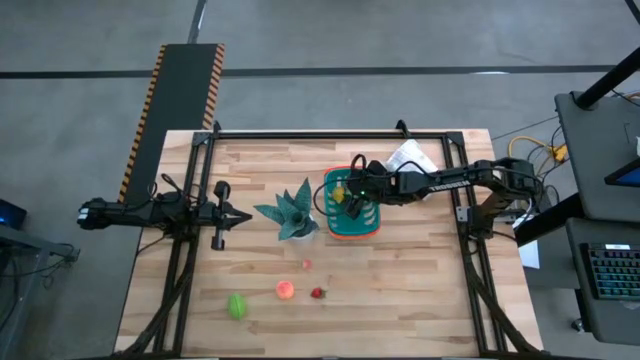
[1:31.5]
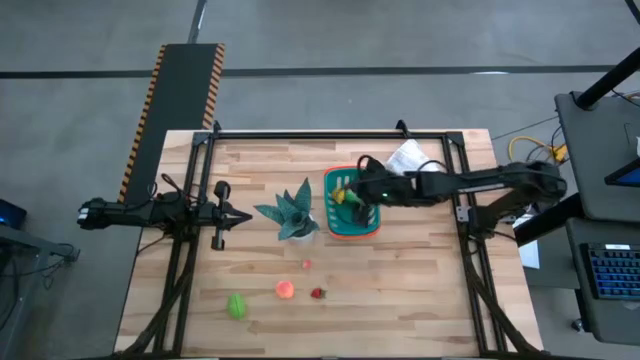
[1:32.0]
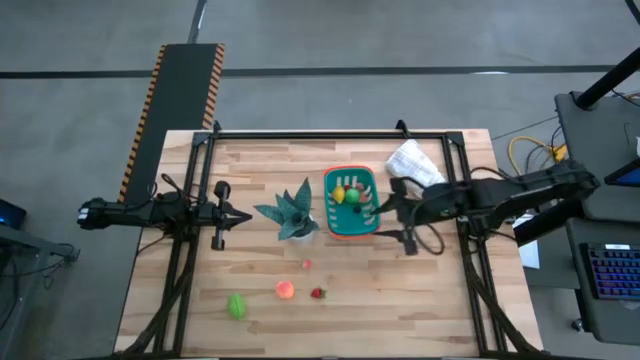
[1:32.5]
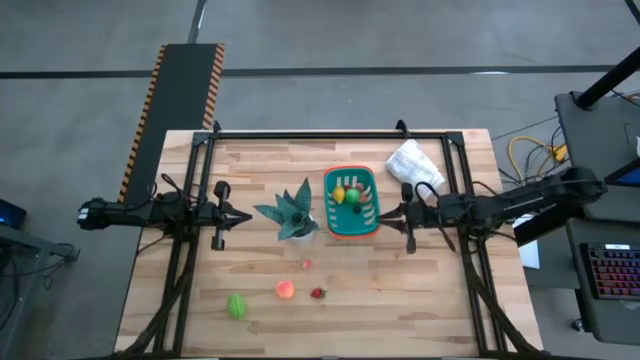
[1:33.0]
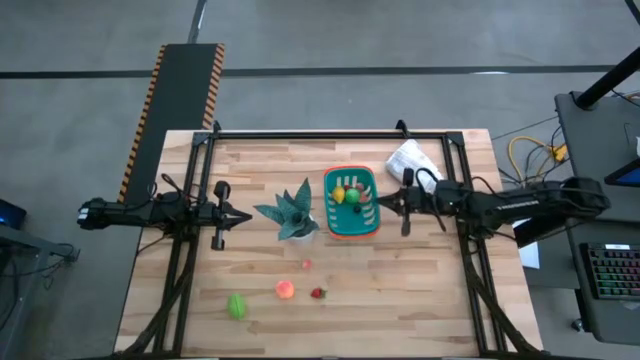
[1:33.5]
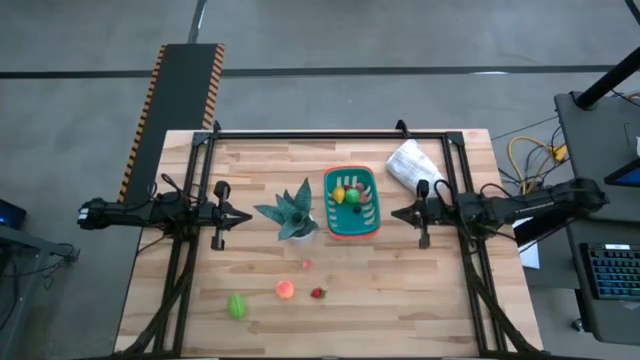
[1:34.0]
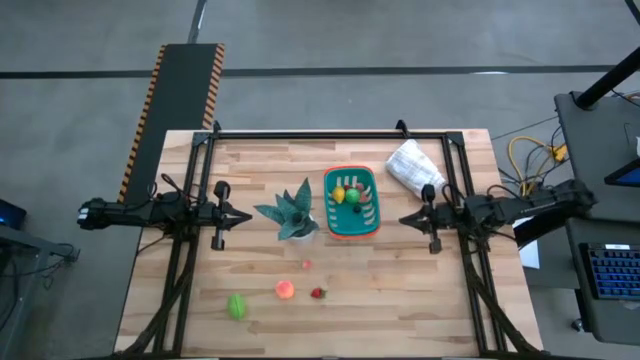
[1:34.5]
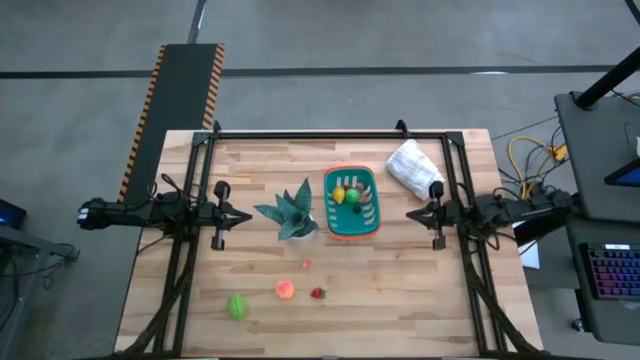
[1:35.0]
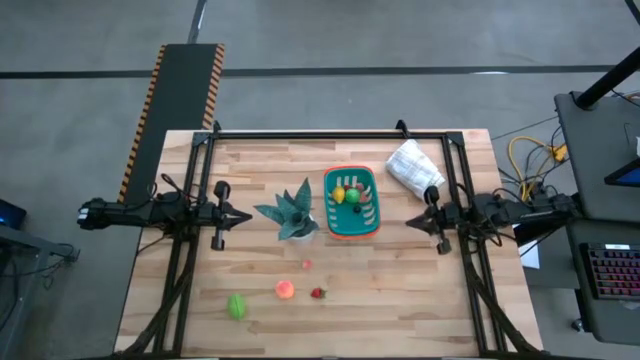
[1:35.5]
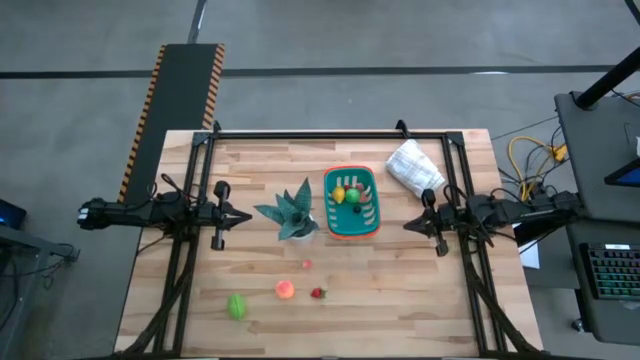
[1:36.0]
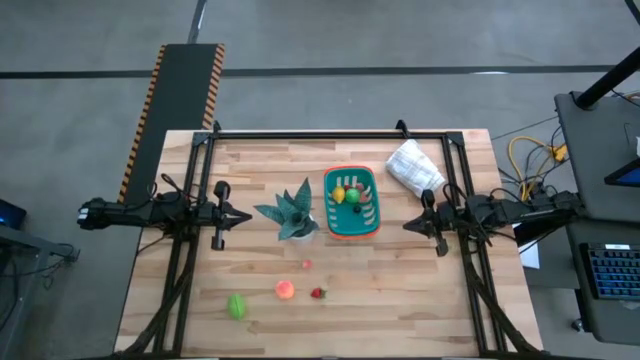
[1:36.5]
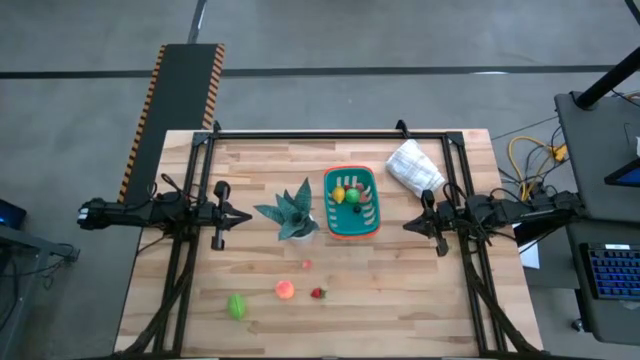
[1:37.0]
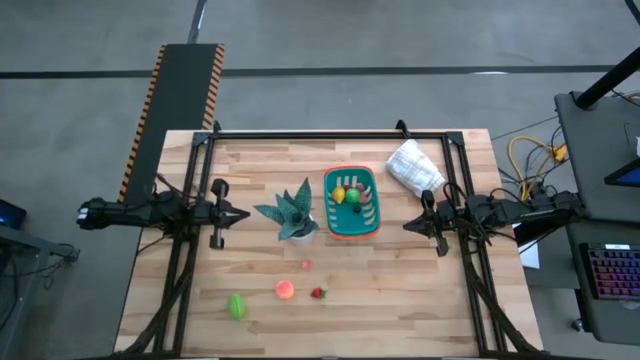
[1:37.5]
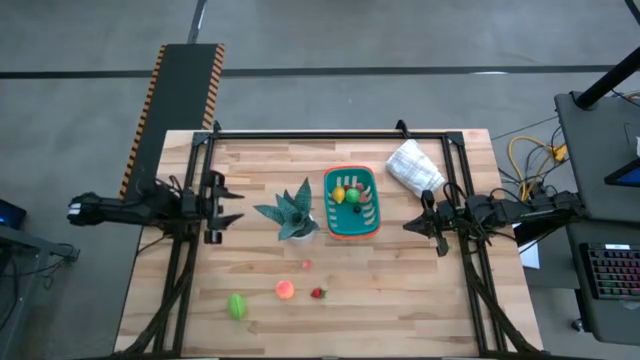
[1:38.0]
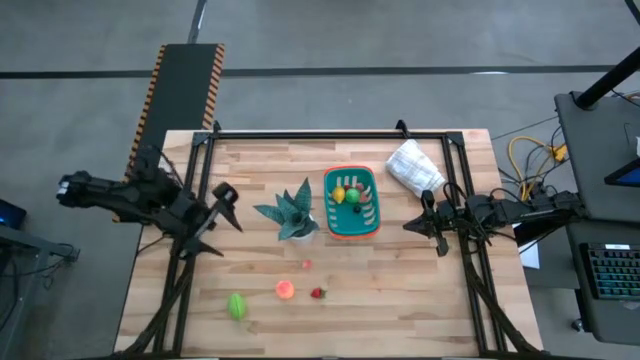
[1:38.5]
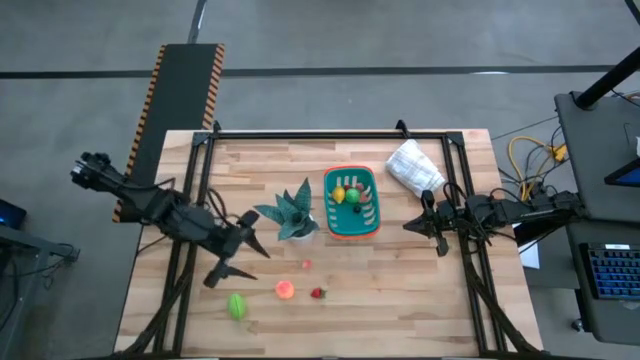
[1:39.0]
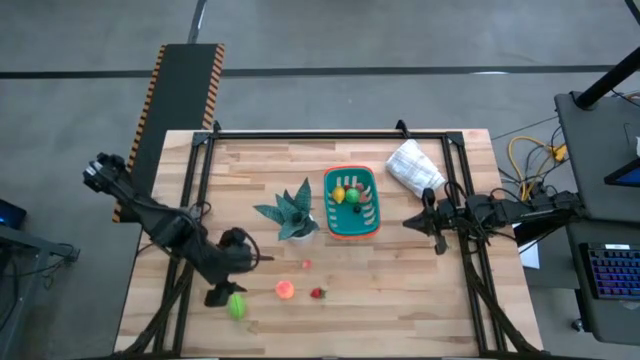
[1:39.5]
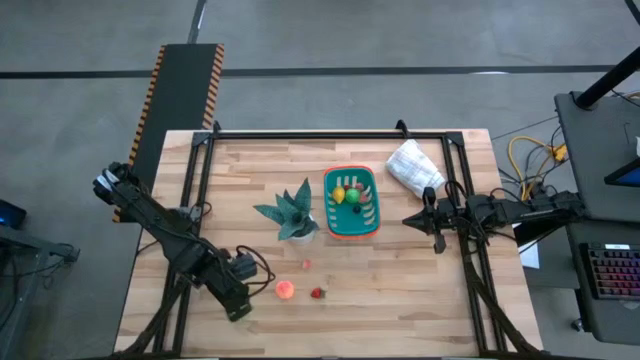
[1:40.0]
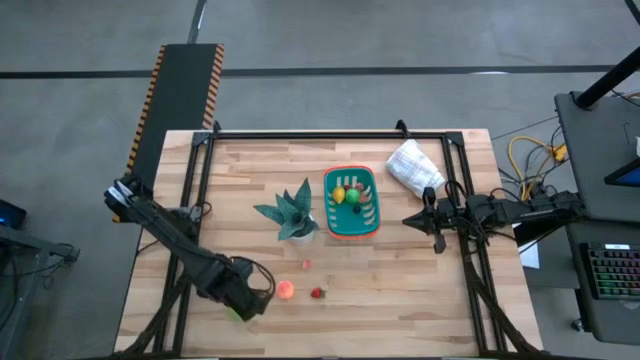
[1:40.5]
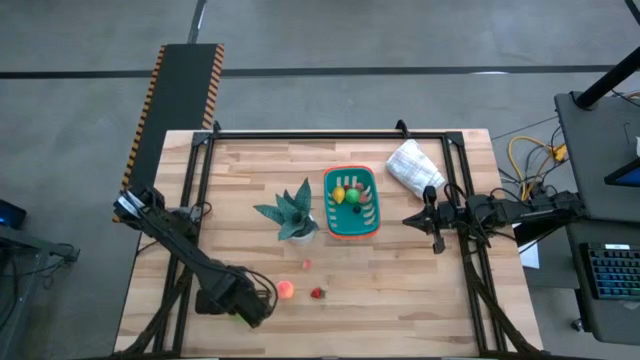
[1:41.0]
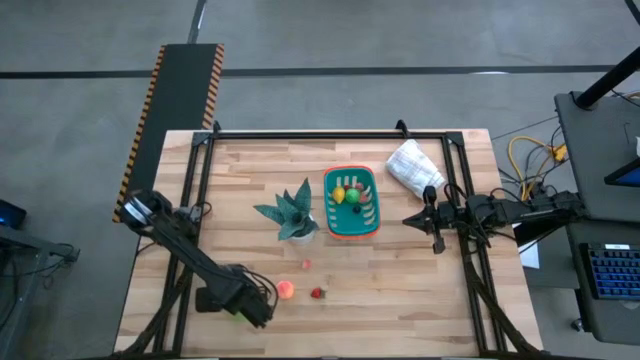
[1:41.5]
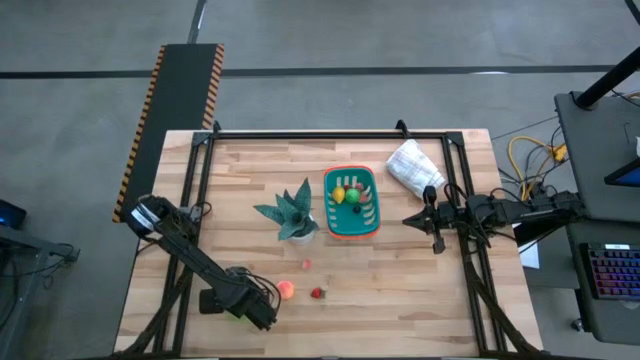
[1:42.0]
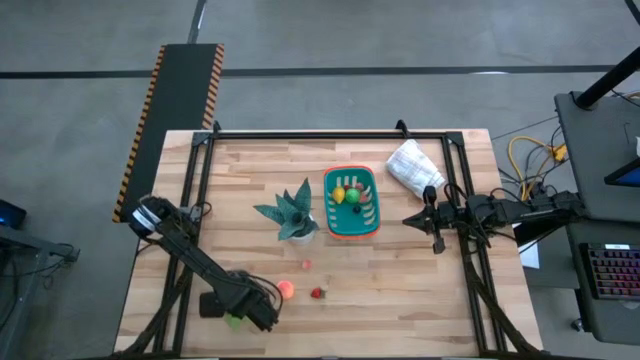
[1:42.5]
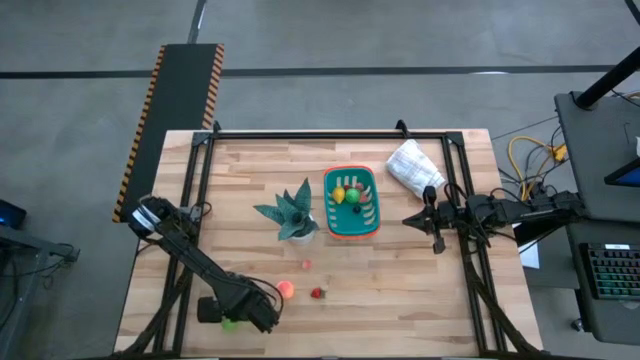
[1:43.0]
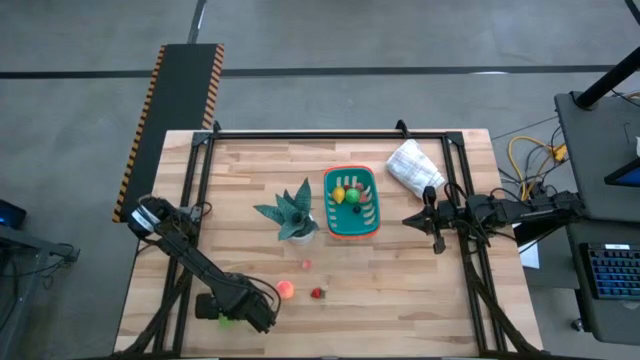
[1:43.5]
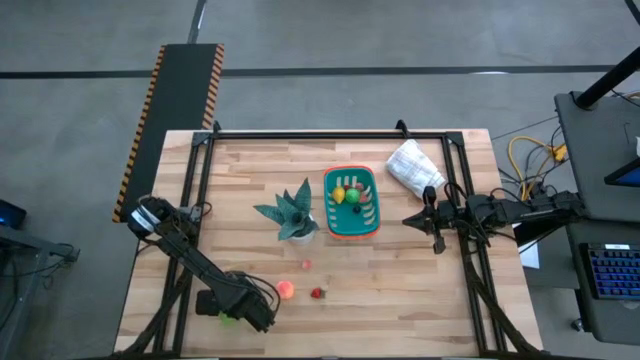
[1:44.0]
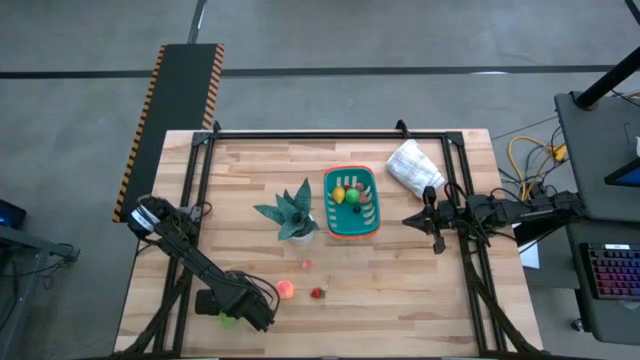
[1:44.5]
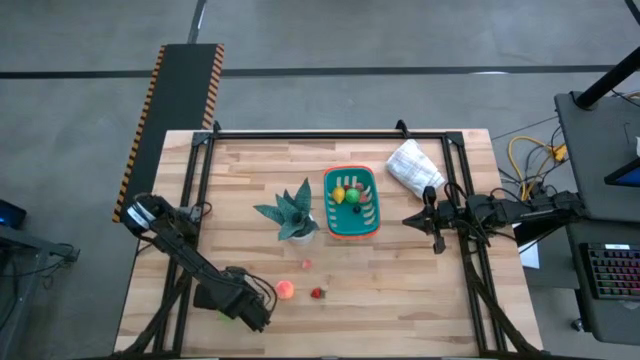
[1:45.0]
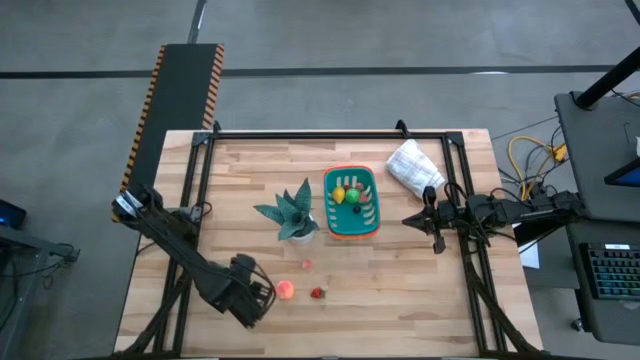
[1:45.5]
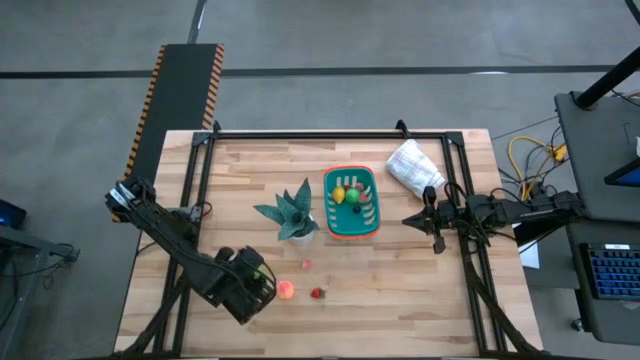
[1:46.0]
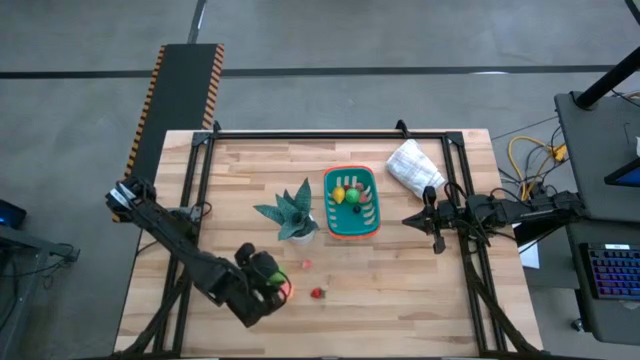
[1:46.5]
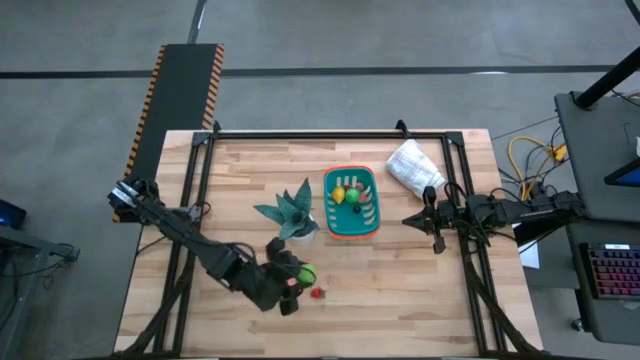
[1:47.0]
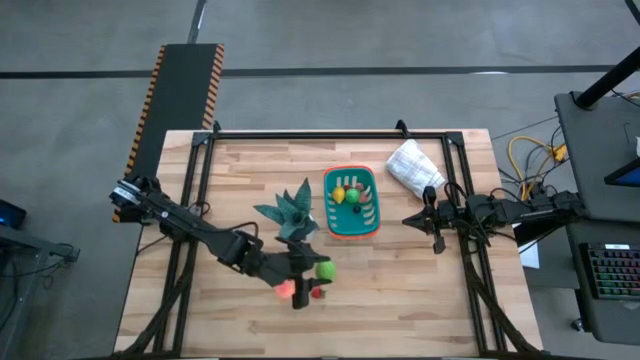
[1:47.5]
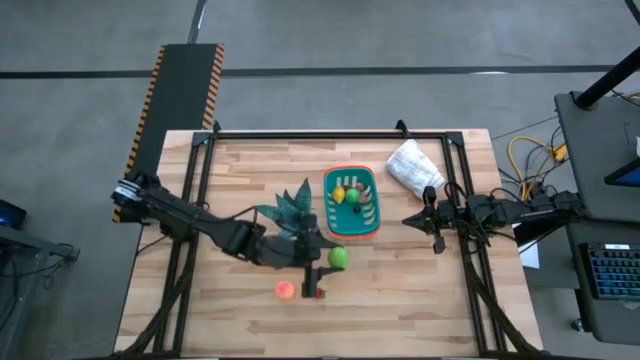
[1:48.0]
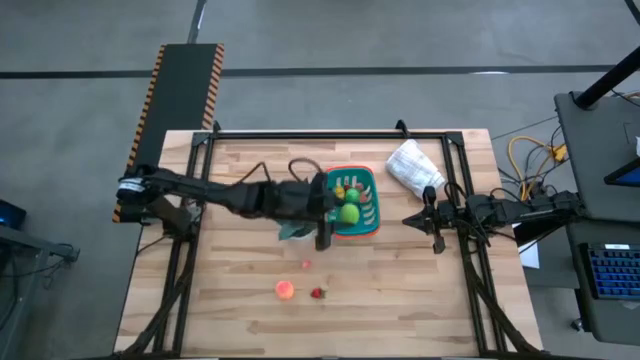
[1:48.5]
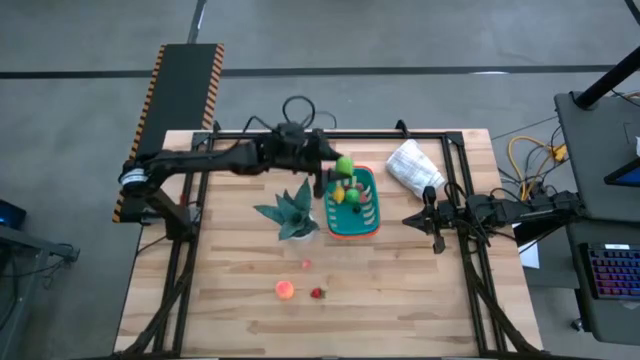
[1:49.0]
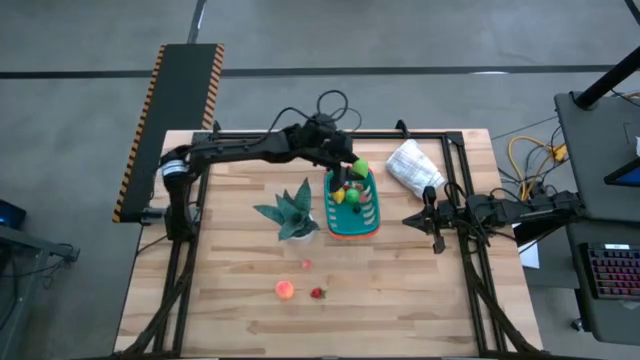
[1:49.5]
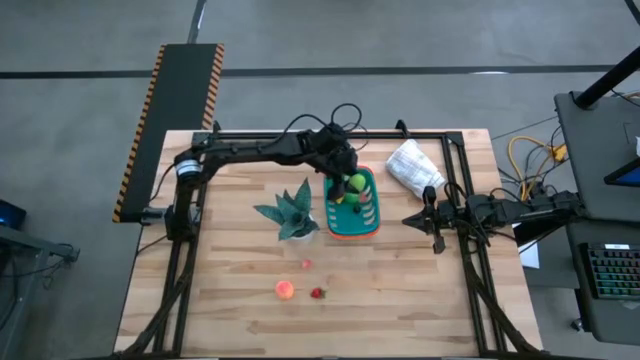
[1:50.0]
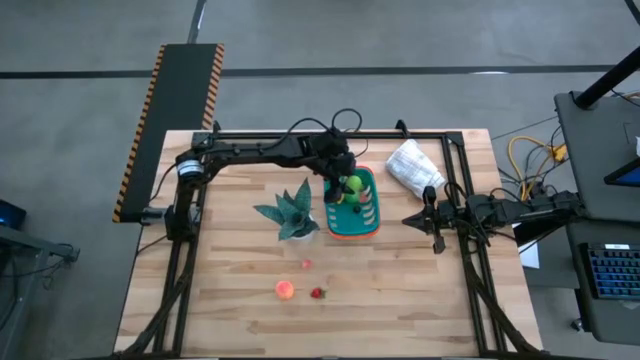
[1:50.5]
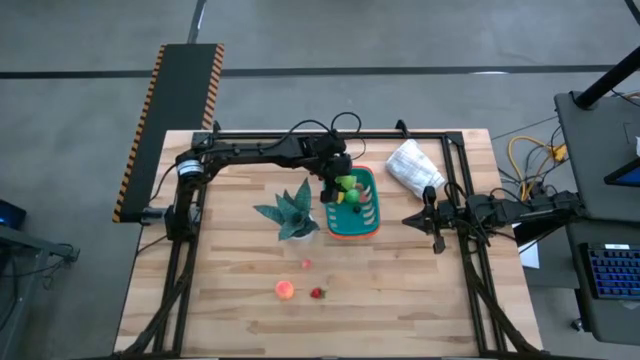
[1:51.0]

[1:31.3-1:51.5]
Task: Build produce basket
Put the melon into the basket

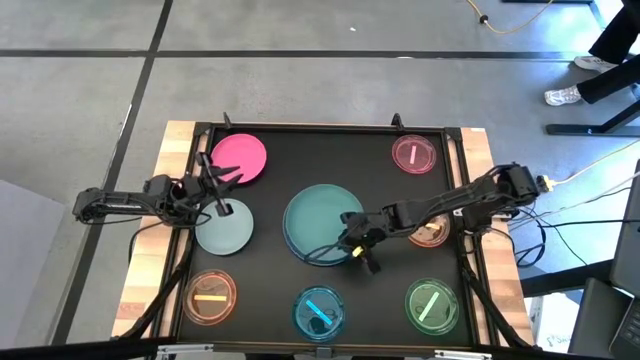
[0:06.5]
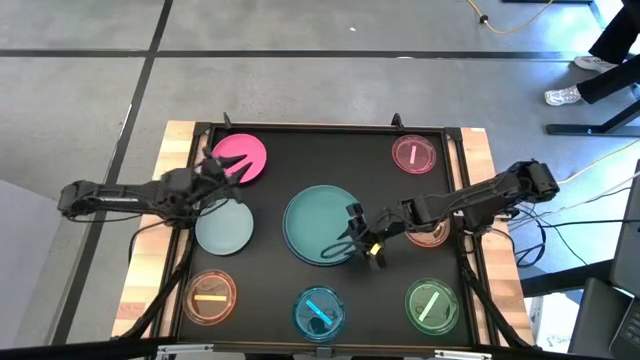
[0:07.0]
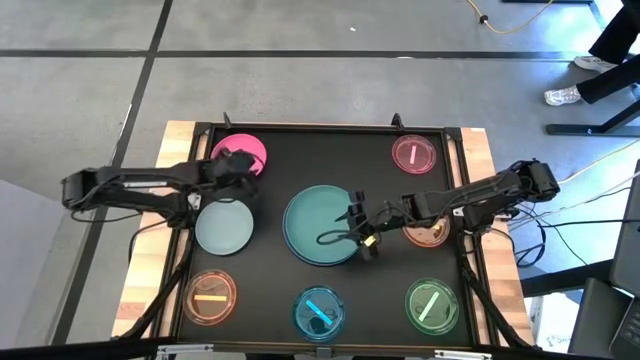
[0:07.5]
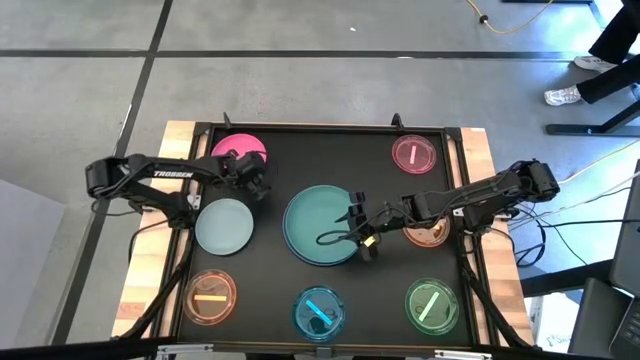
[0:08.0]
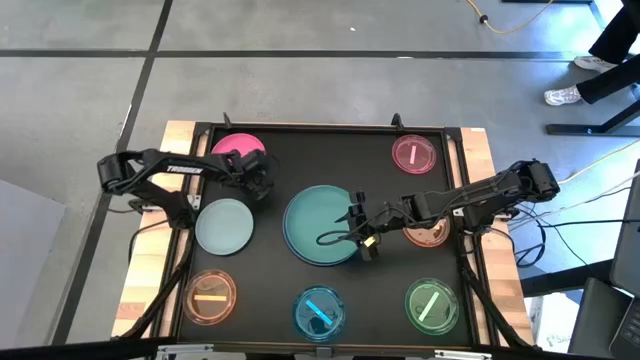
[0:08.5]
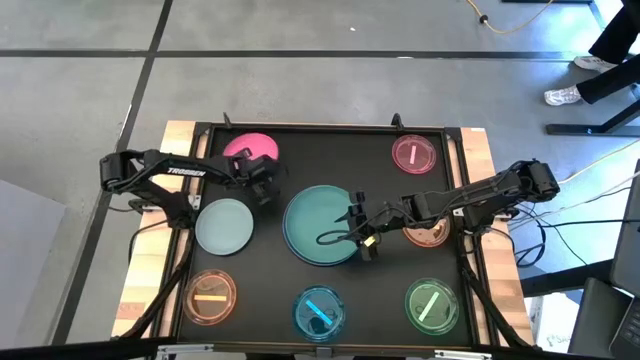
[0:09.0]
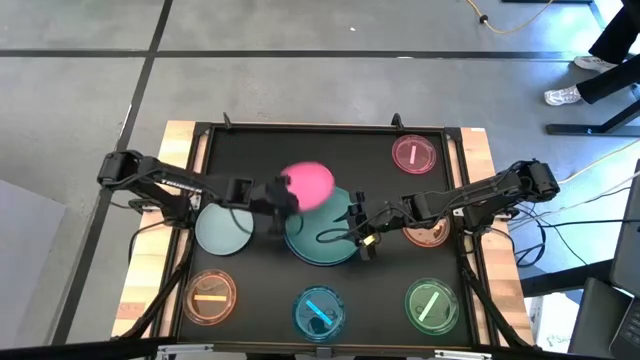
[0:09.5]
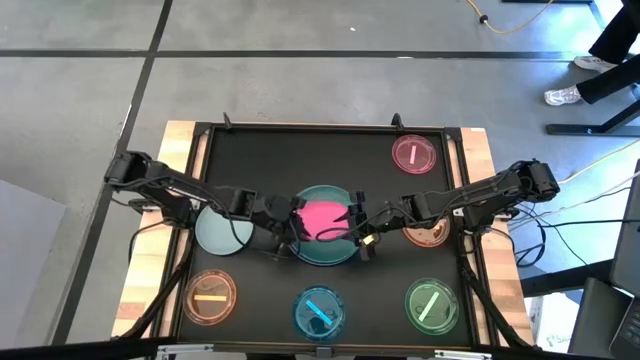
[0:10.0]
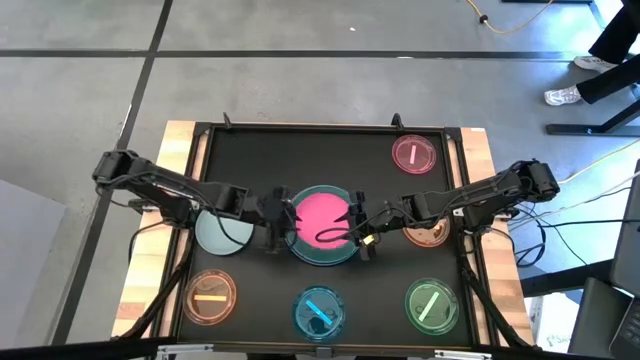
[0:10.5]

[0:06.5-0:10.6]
Task: Stack plastic plates
Stack the pink plate on top of the green plate
